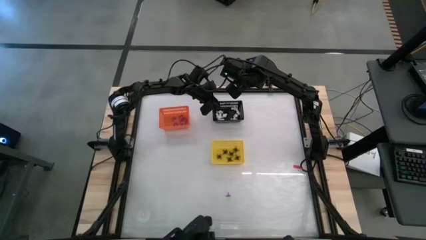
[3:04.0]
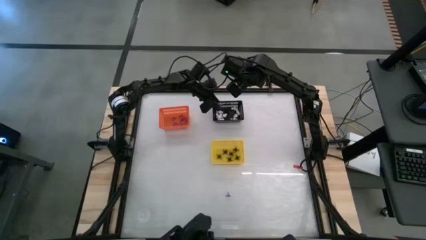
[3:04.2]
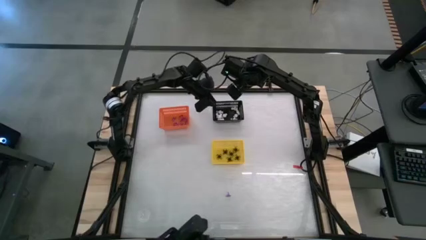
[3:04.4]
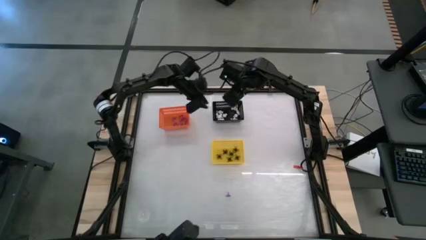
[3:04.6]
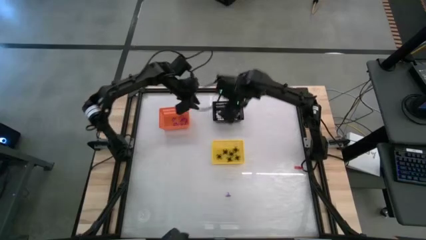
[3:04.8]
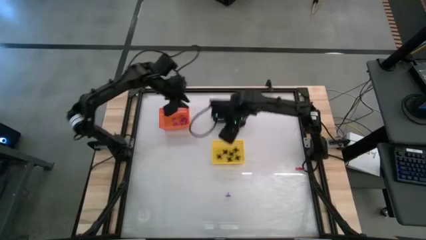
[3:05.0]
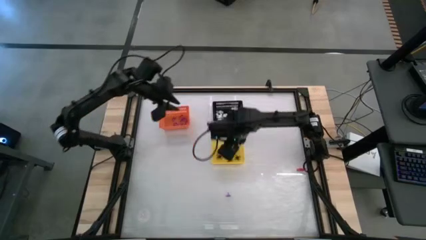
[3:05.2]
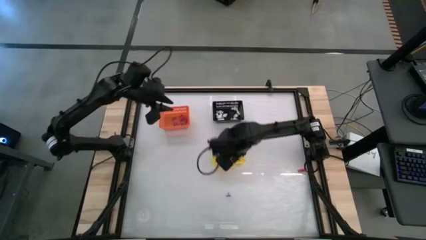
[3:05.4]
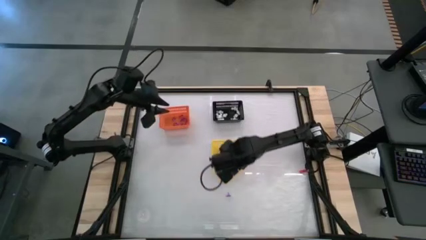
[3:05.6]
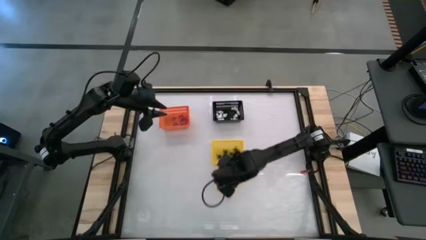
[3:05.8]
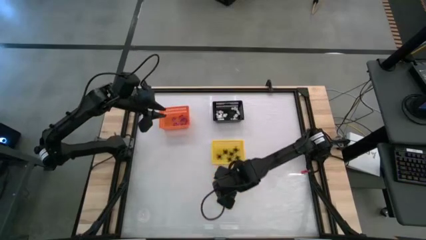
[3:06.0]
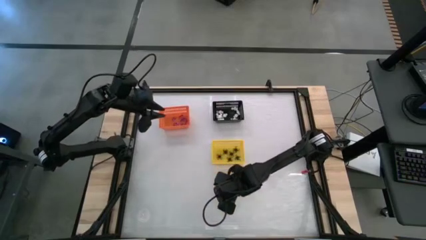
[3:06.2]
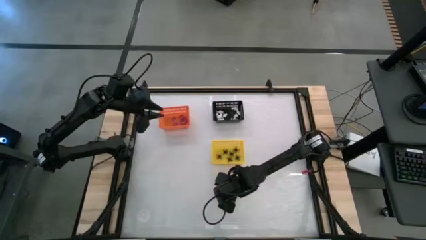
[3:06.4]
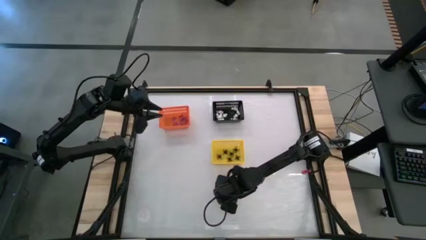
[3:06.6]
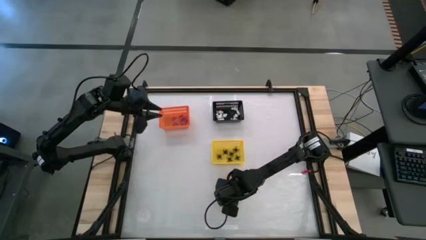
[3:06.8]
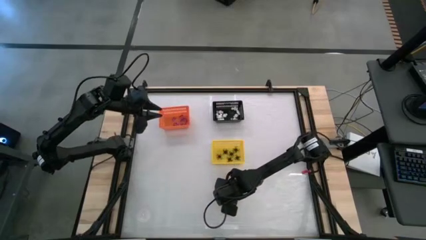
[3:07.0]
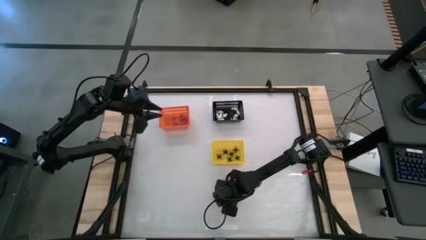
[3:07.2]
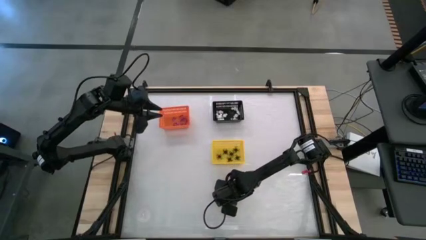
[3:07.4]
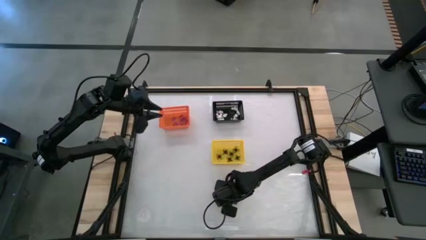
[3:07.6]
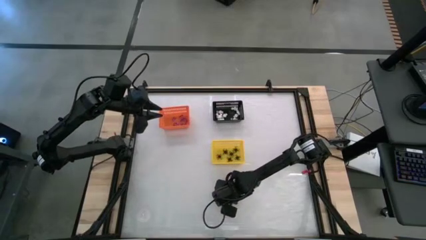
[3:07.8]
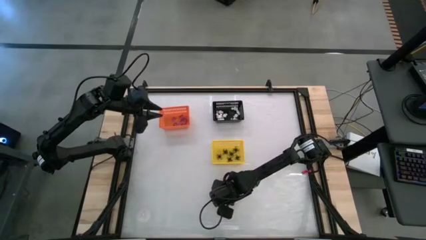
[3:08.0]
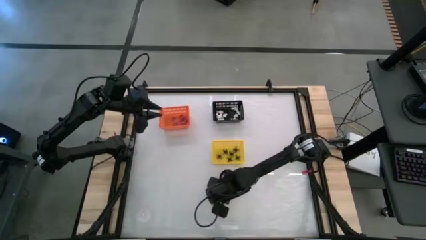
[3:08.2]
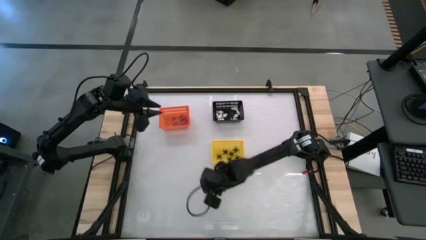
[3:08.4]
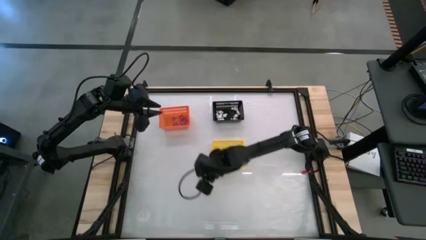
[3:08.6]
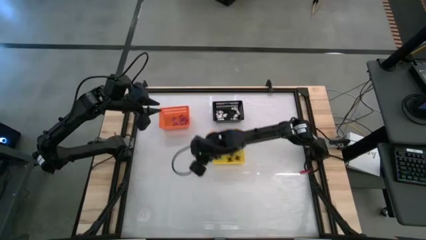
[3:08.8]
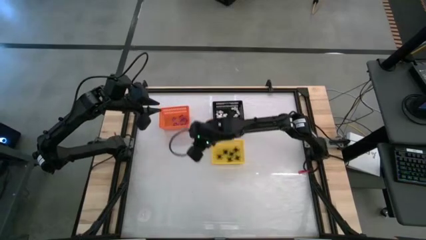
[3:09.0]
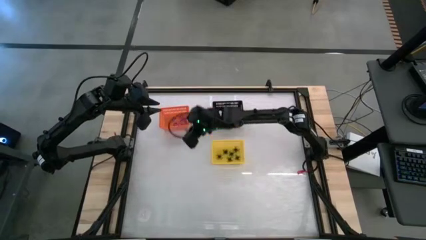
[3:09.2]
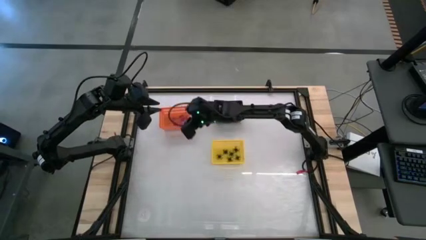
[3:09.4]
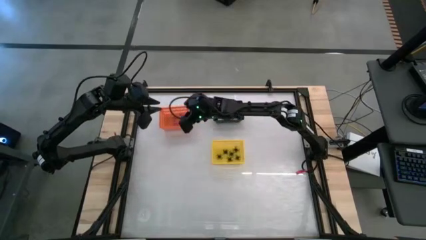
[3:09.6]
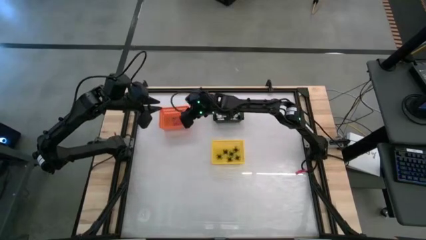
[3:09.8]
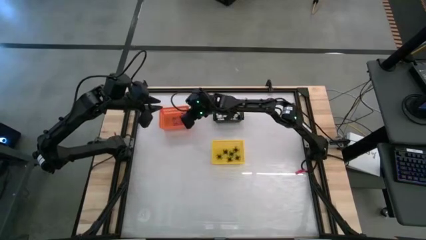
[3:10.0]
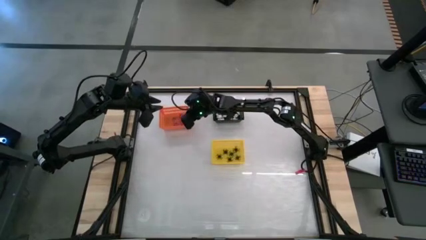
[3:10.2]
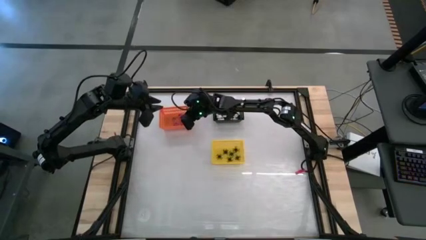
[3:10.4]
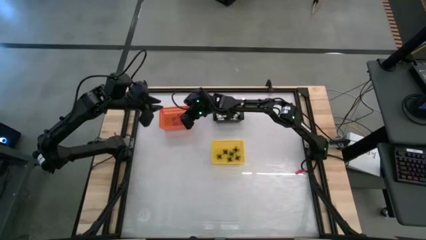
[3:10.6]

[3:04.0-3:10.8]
Task: Sort Halloween decoration
Put the witch into the orange bin

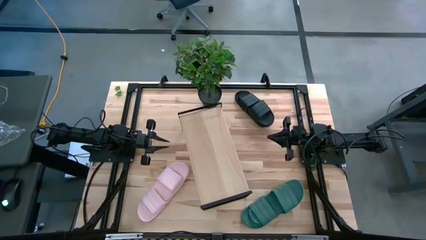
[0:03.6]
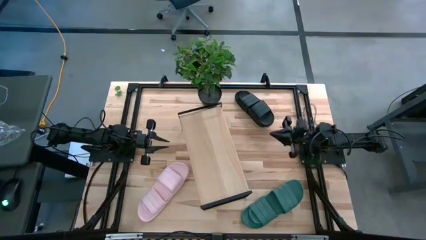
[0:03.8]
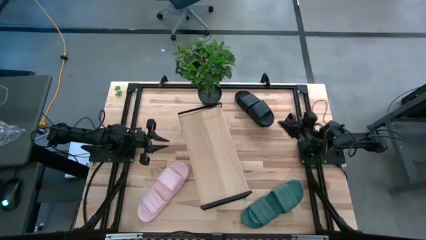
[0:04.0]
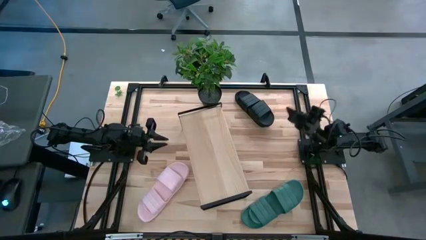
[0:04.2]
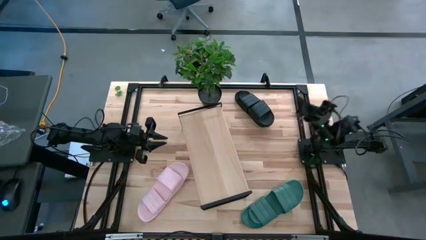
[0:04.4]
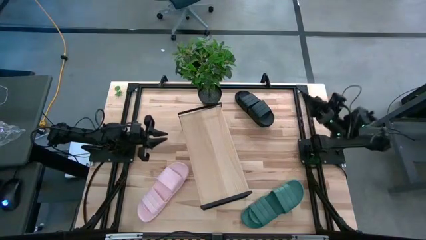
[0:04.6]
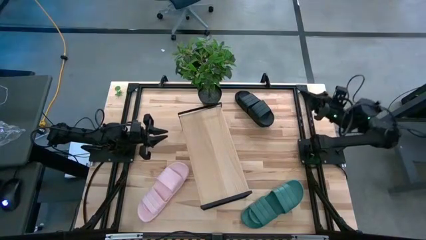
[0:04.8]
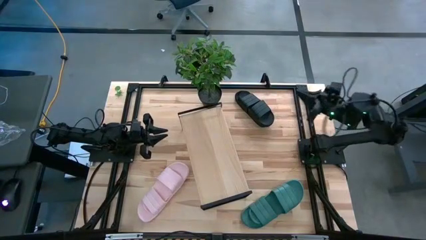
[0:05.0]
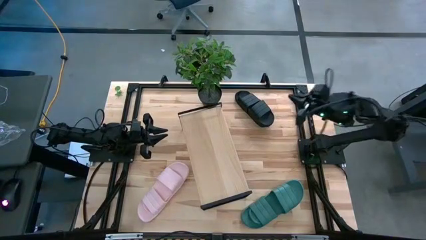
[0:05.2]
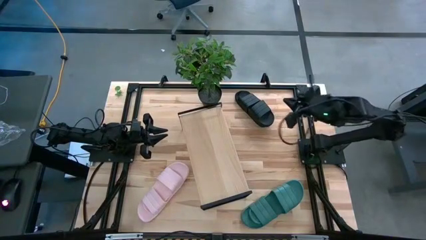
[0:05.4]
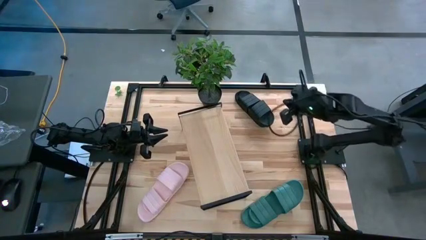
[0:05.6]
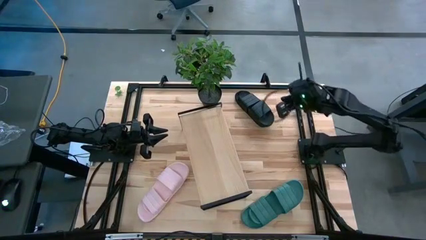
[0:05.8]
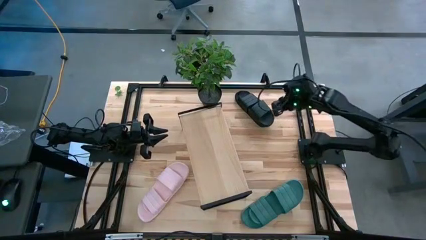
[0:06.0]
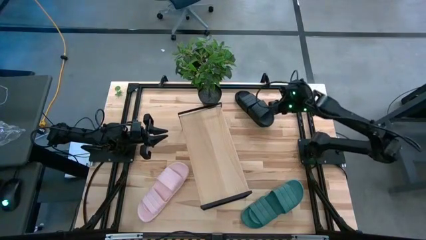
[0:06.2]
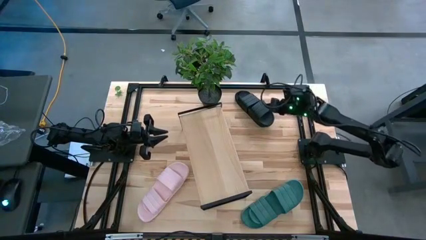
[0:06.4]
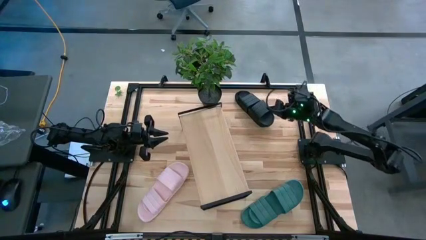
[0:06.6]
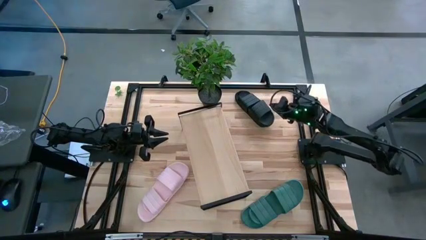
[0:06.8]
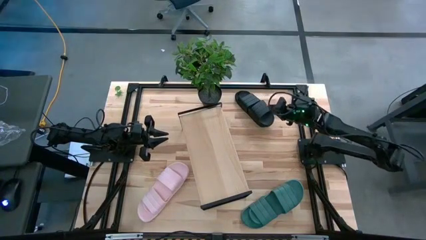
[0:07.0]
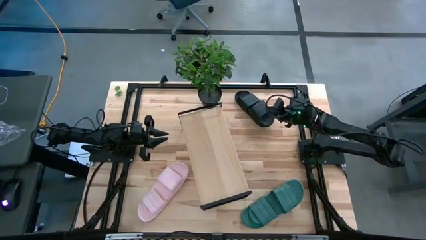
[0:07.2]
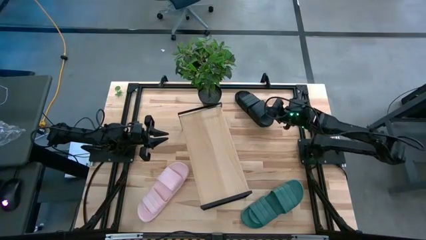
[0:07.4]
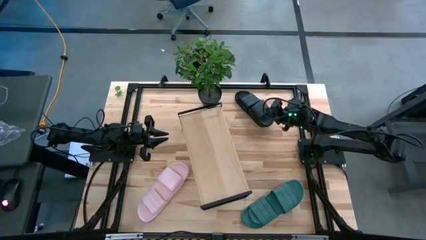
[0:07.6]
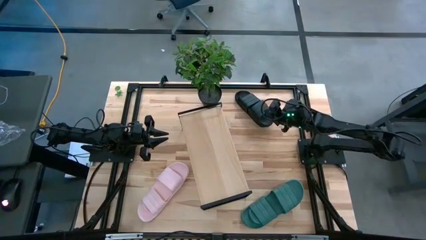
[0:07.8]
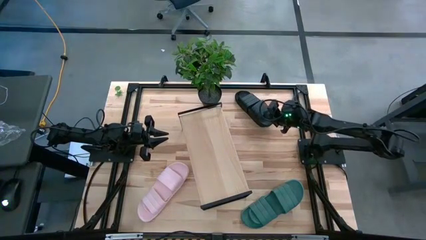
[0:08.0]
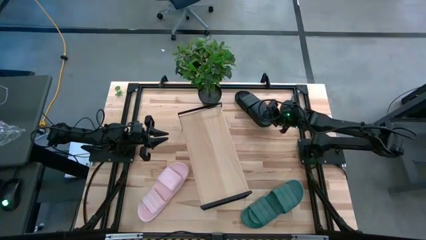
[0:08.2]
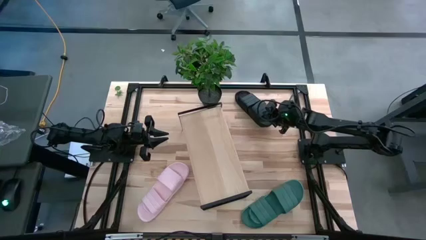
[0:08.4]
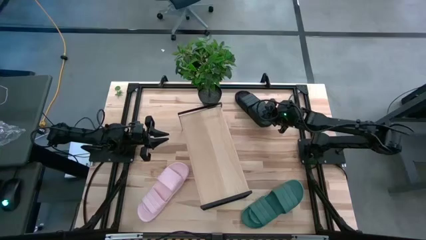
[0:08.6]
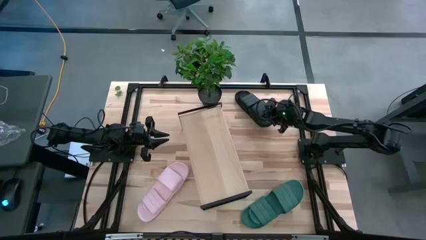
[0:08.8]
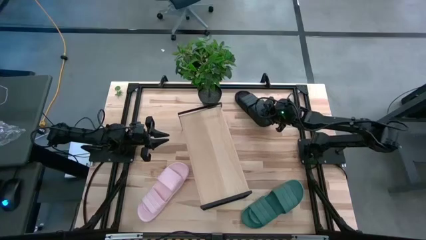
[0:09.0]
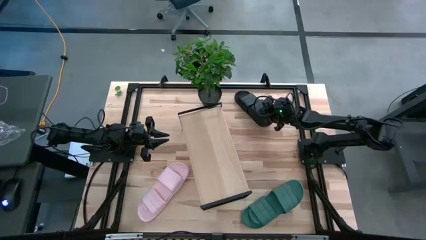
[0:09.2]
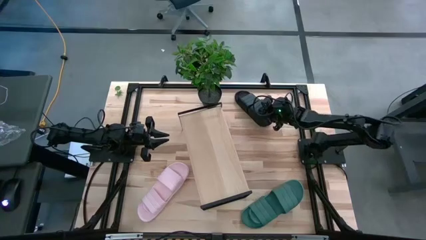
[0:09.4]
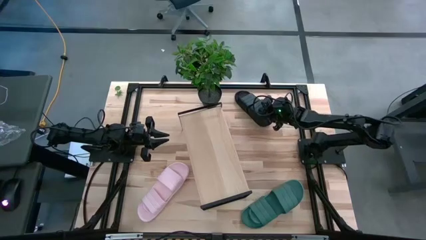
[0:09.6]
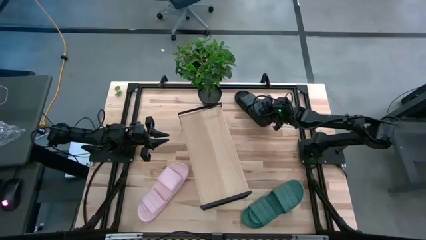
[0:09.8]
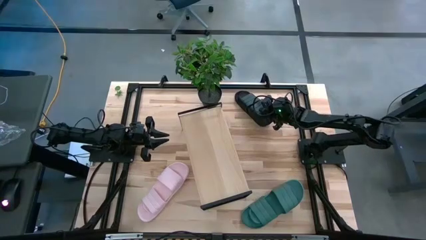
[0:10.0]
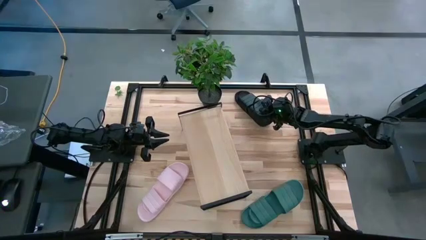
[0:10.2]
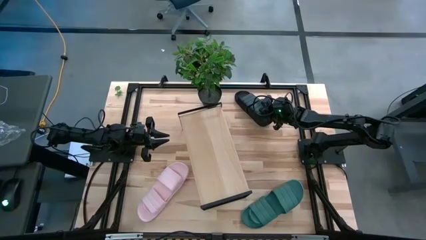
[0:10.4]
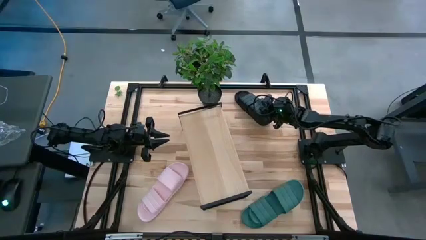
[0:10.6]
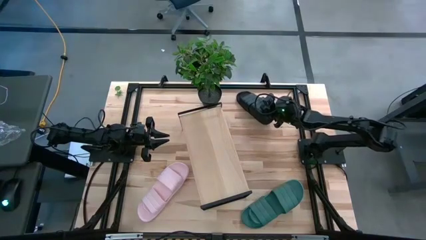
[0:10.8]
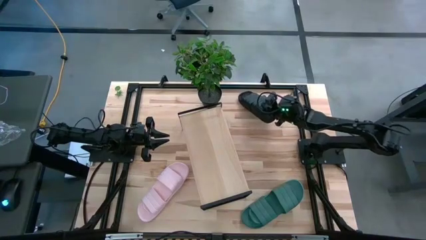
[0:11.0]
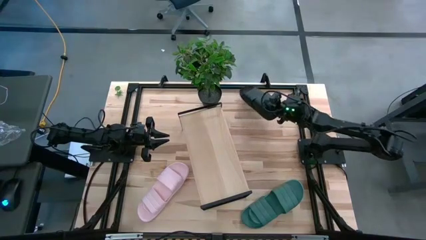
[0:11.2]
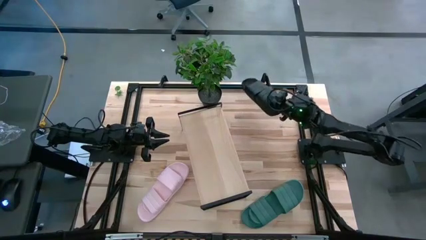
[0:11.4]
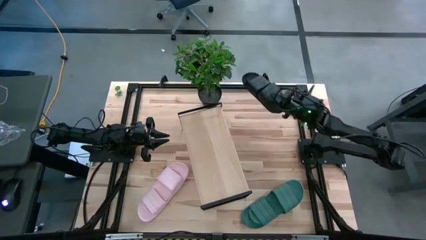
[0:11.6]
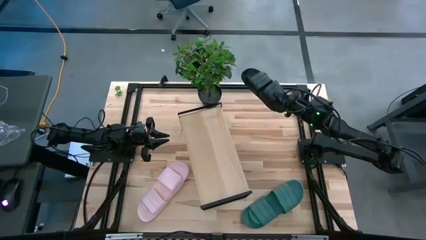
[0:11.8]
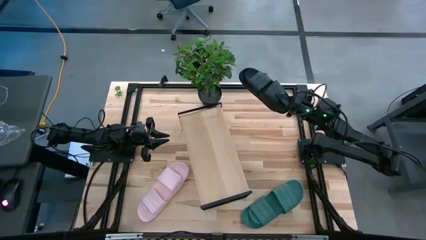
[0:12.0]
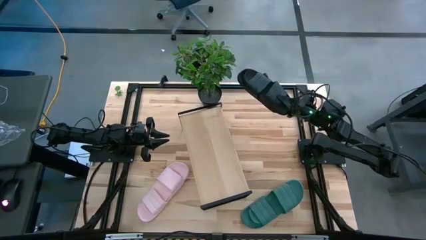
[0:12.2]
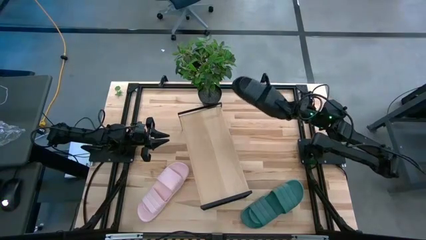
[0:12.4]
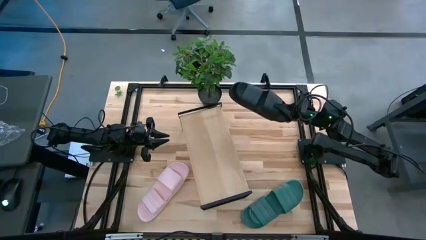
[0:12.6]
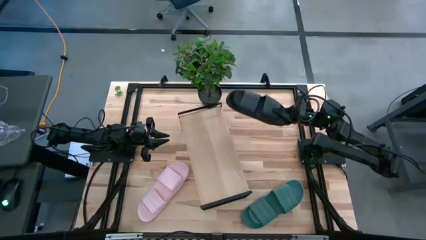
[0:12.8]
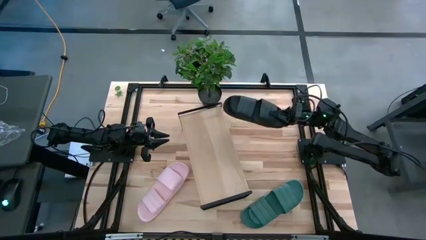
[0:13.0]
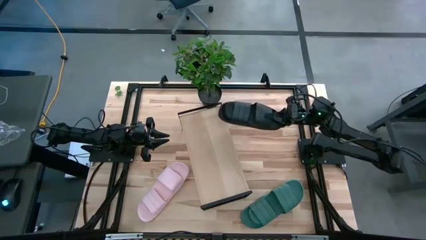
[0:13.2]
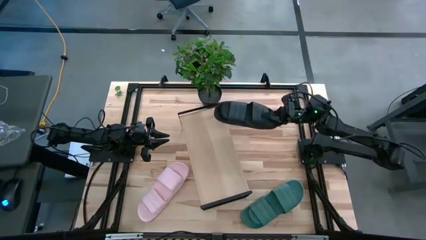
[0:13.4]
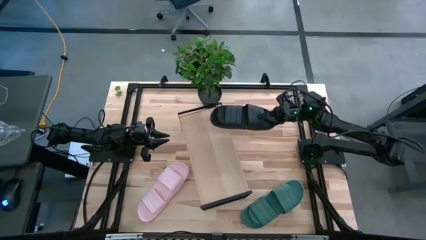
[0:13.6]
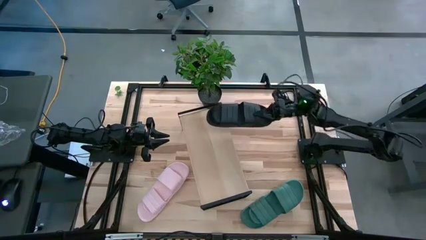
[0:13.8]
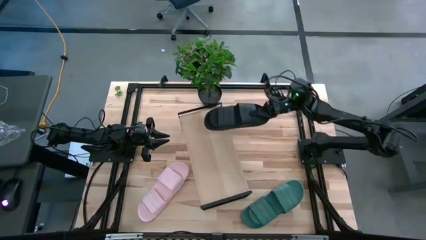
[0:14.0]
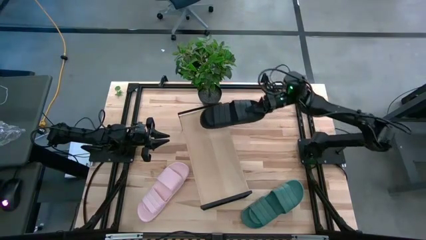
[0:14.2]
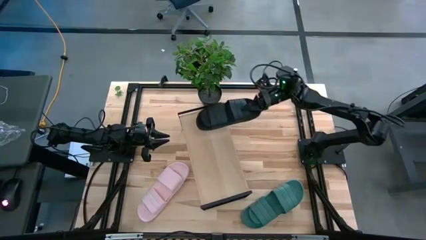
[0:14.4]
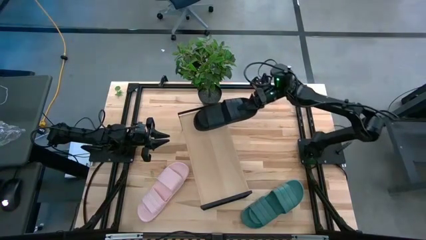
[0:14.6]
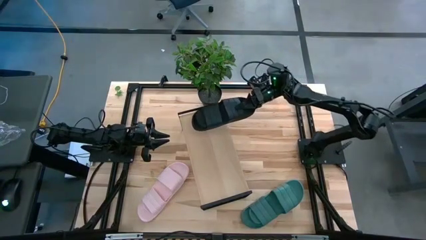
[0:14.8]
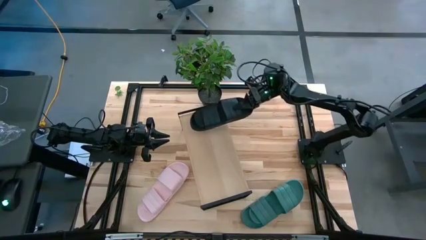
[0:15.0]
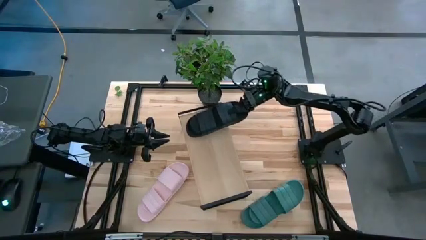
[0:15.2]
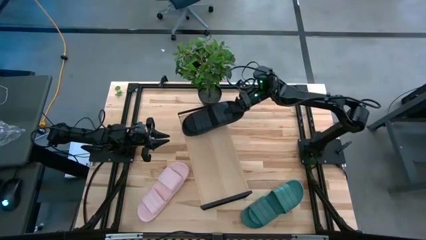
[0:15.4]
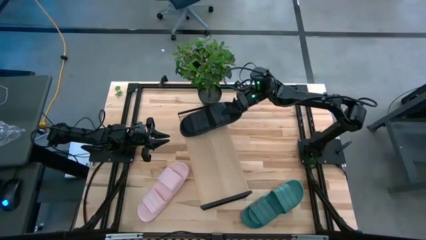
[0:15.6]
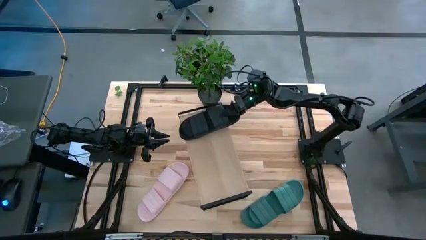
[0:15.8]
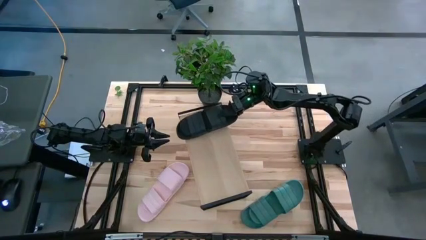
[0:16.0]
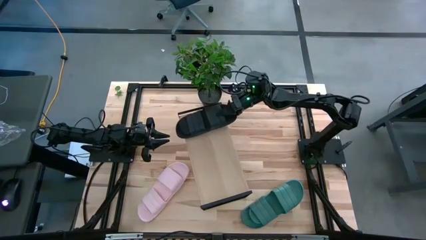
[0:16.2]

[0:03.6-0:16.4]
Task: Pick and place slides into the shelf
Put the black slides on the shelf
